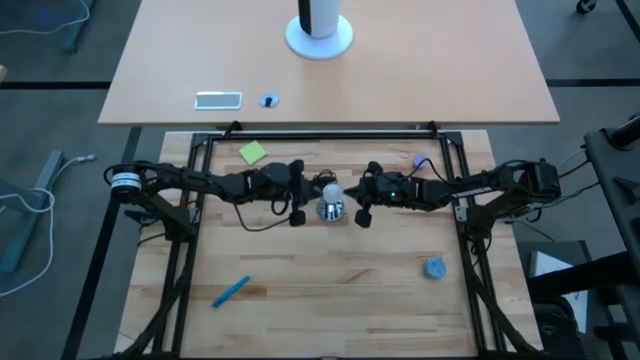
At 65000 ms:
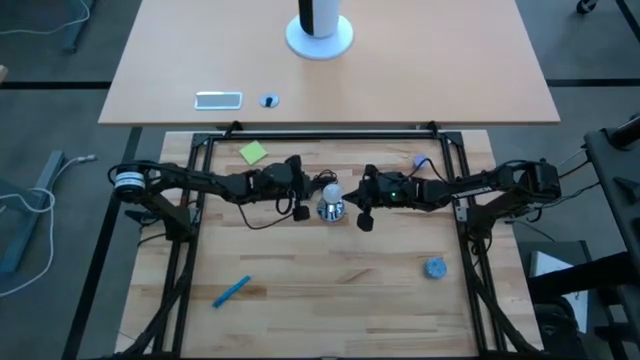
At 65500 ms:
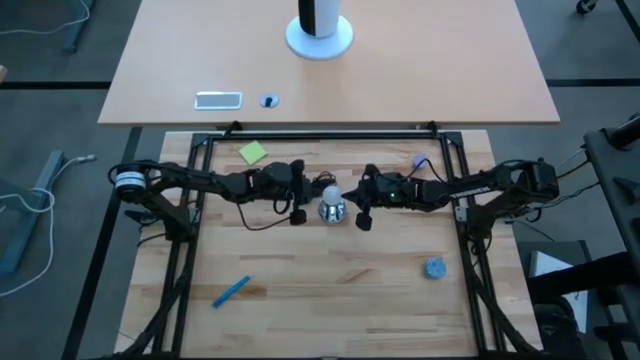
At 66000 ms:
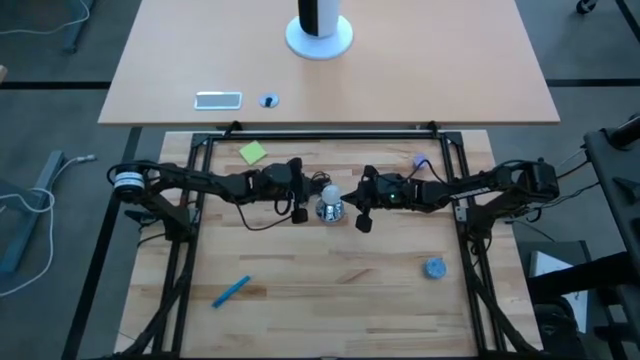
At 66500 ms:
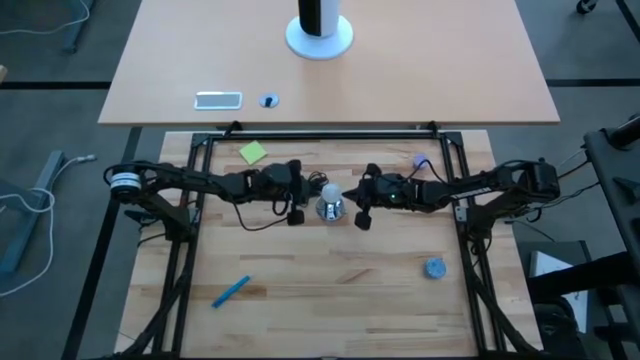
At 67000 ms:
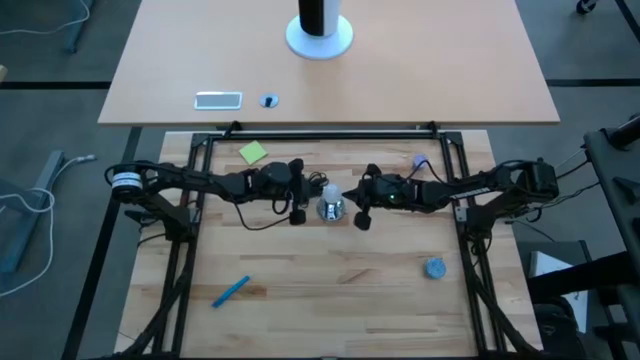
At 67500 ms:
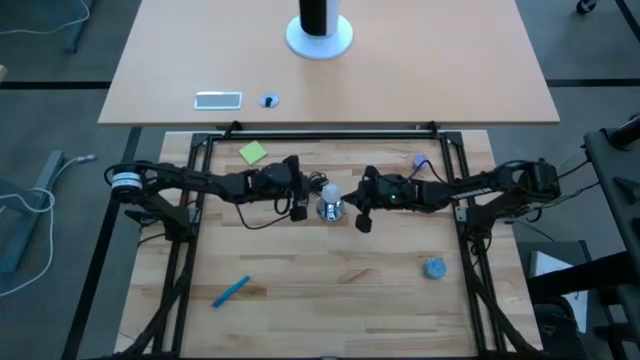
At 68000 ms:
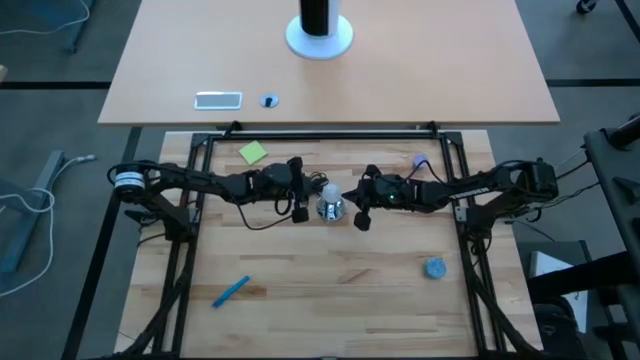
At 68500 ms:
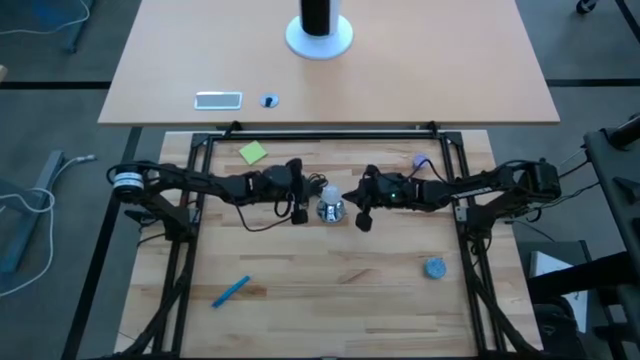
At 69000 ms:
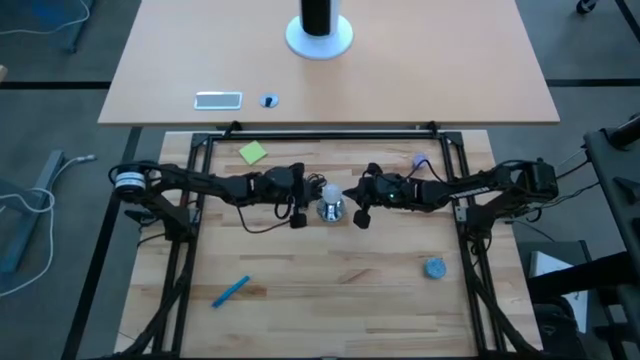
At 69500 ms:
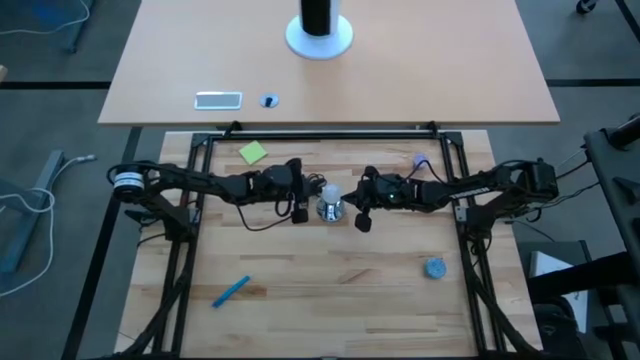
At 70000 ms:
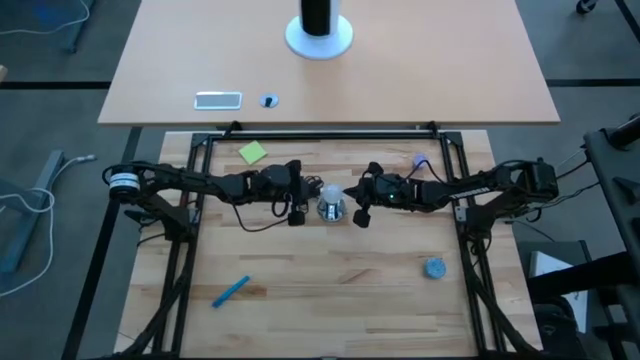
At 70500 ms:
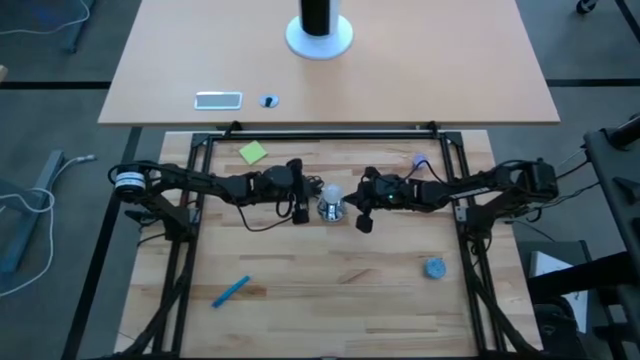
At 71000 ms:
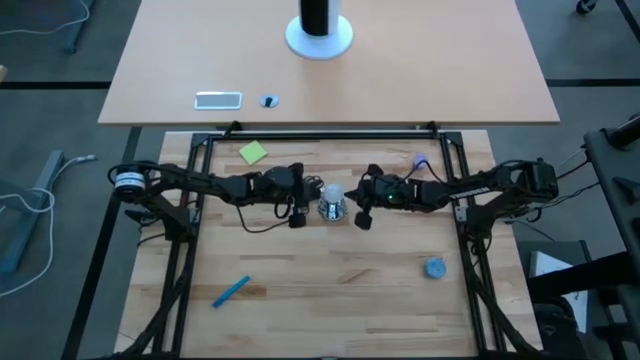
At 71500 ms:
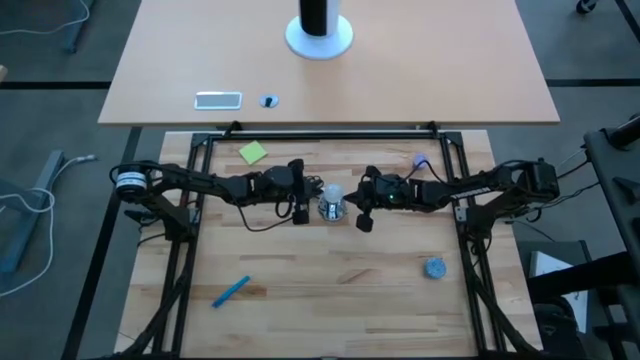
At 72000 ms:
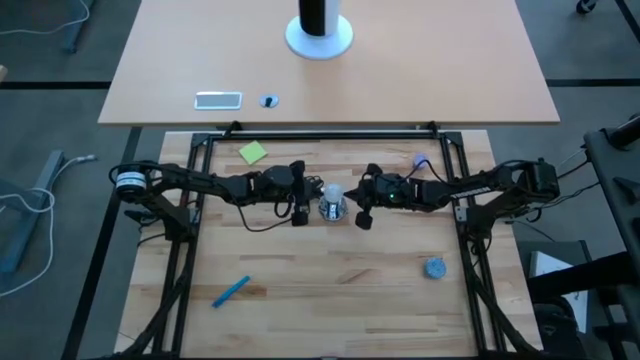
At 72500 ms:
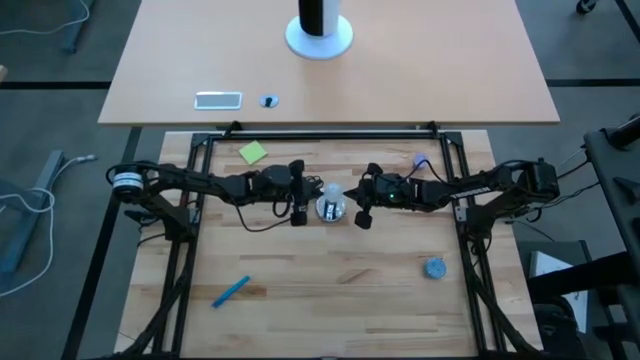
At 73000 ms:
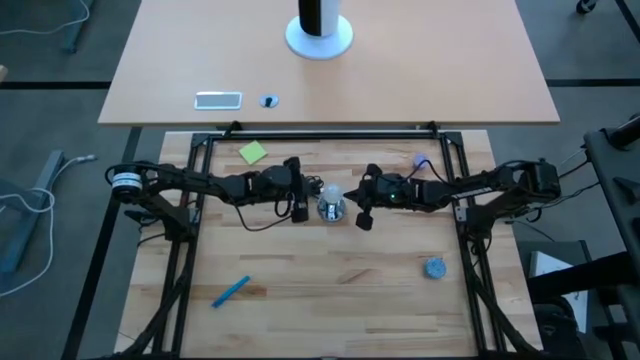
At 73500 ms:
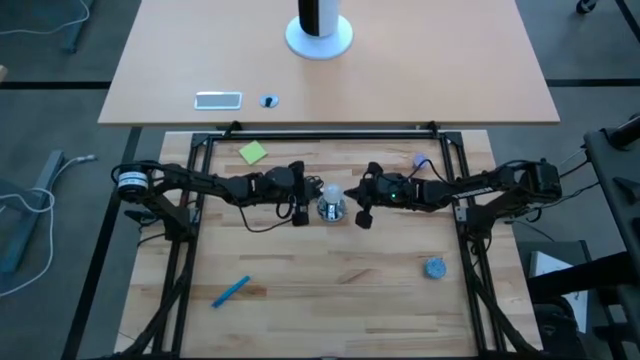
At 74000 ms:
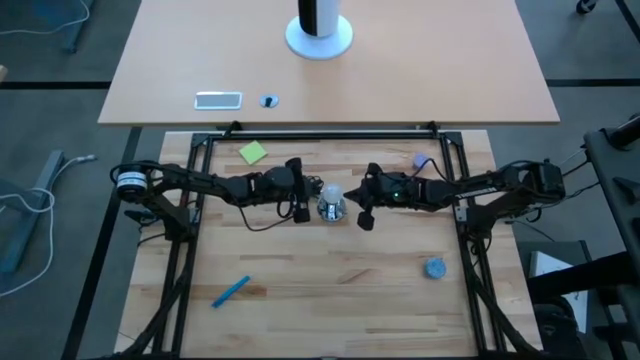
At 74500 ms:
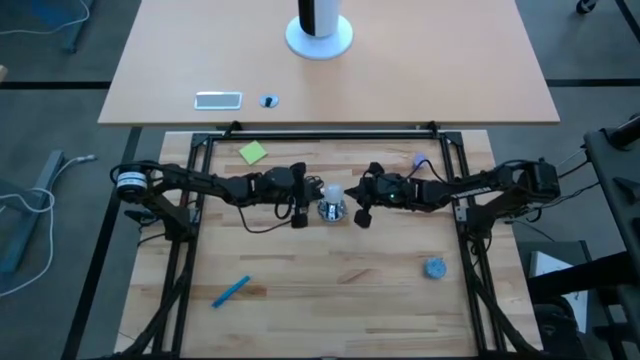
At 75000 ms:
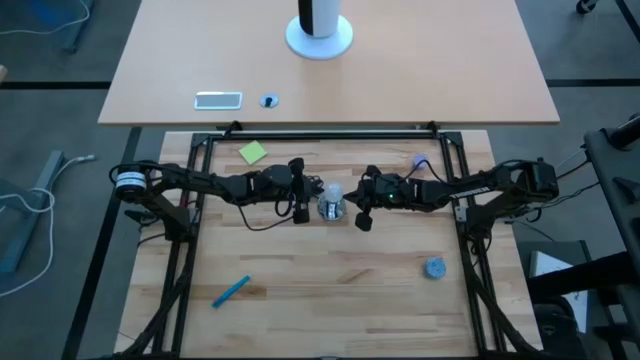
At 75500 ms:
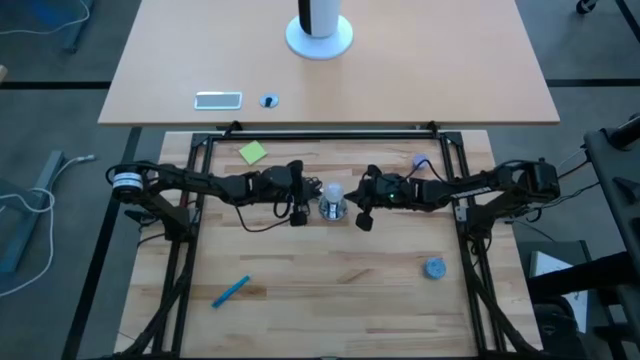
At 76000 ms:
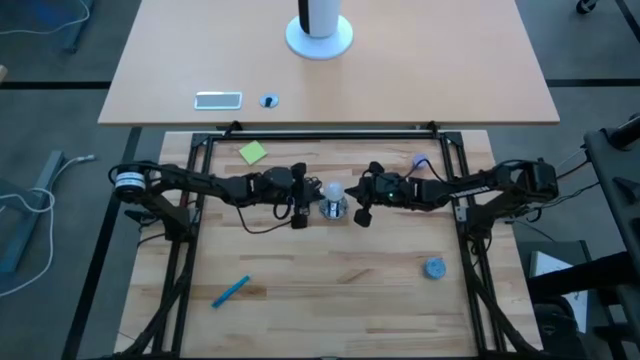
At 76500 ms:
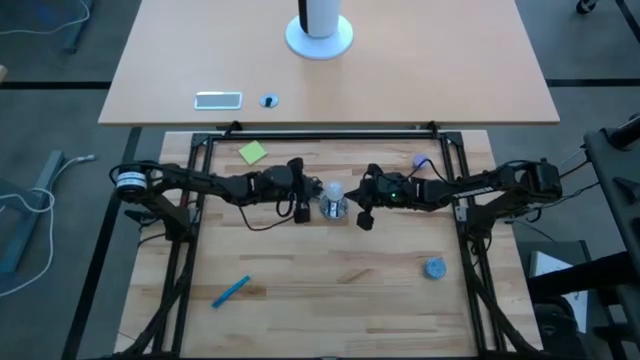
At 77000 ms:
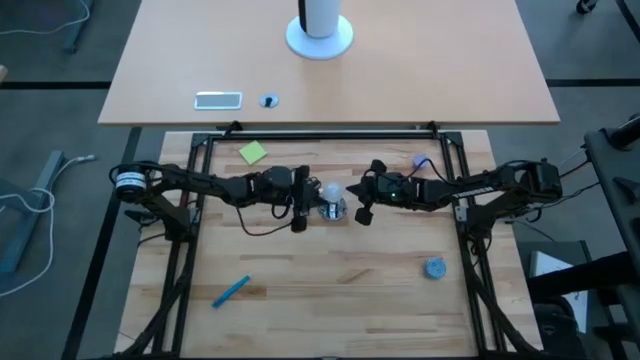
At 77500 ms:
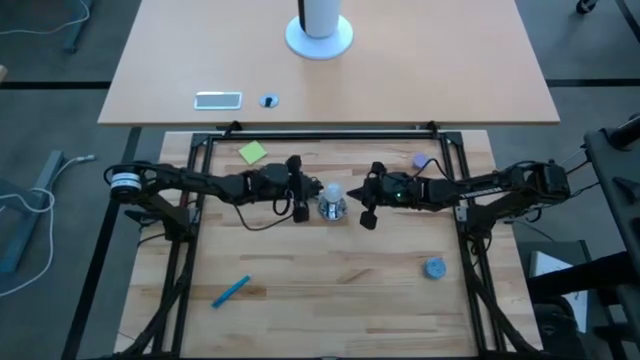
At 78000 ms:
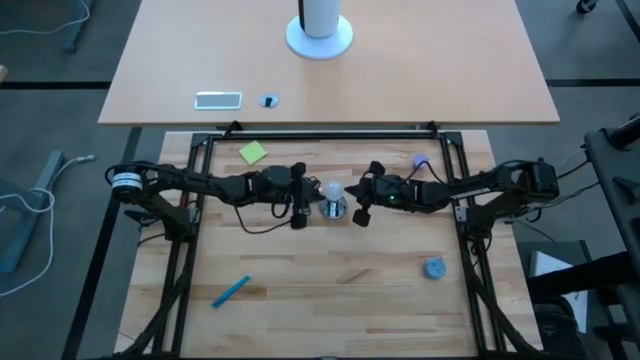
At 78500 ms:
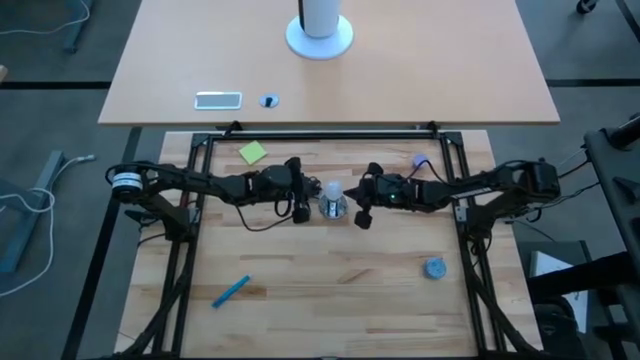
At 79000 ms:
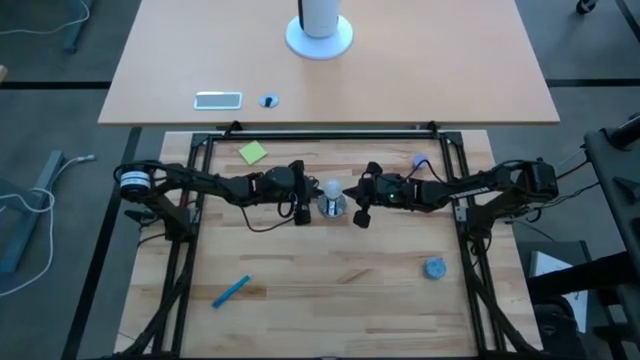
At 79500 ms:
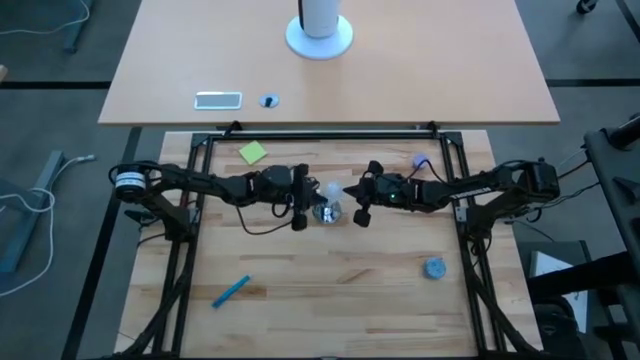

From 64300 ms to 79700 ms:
Task: Screw lightbulb
Remove the lightbulb from the lamp

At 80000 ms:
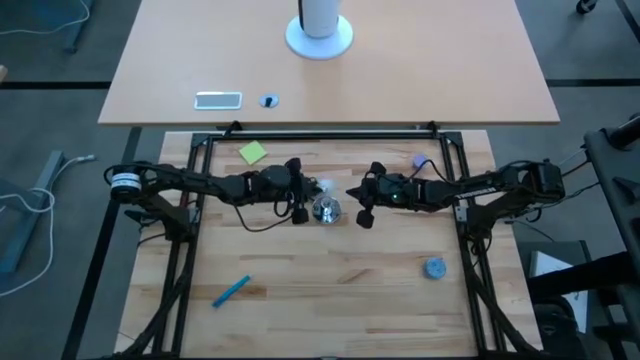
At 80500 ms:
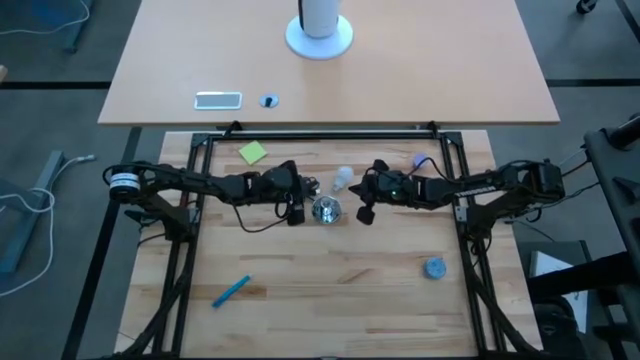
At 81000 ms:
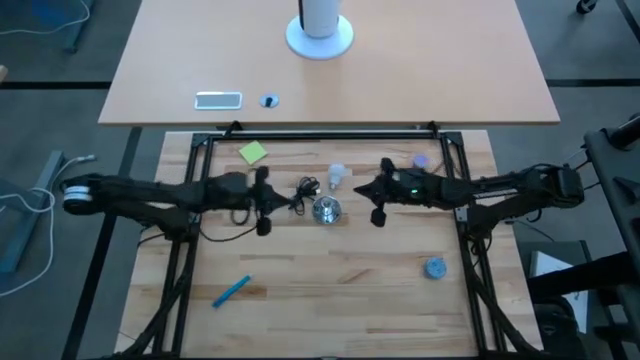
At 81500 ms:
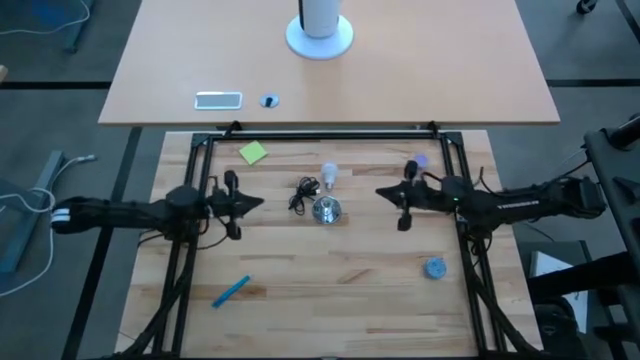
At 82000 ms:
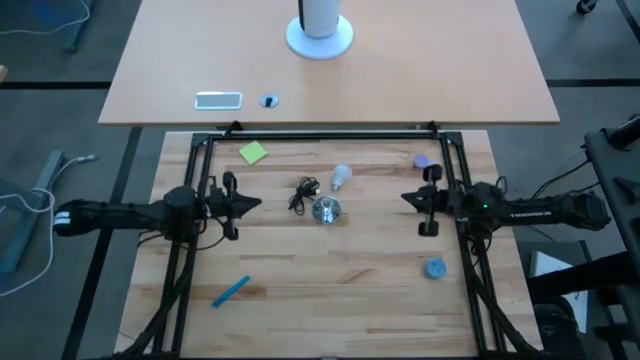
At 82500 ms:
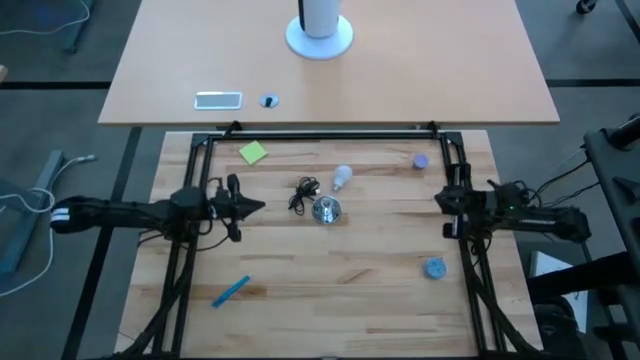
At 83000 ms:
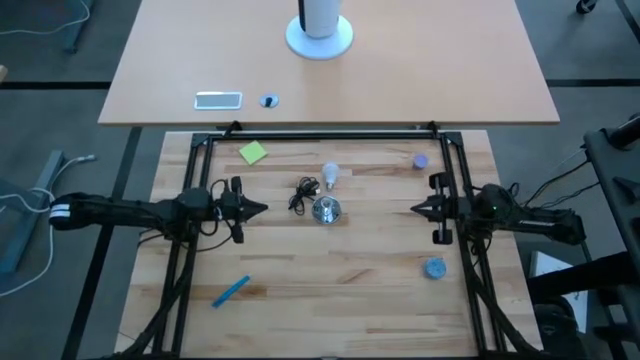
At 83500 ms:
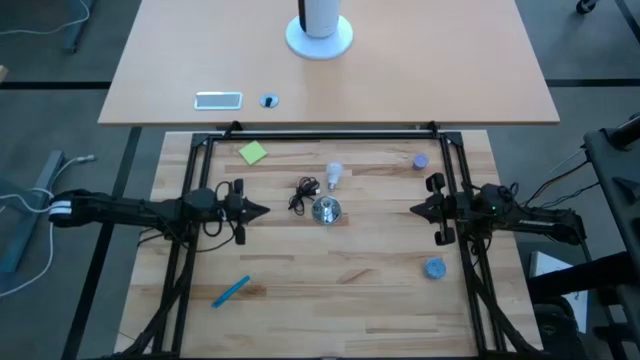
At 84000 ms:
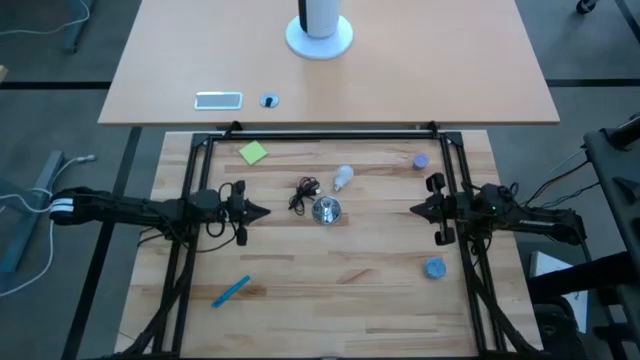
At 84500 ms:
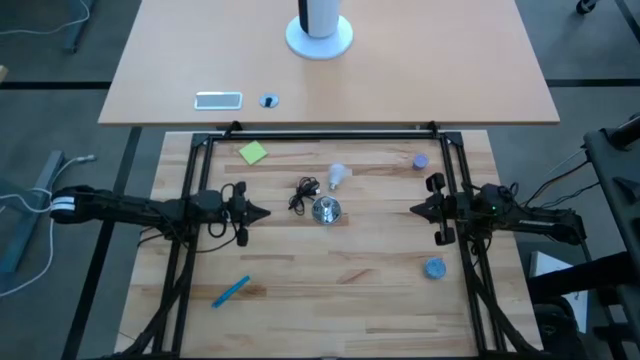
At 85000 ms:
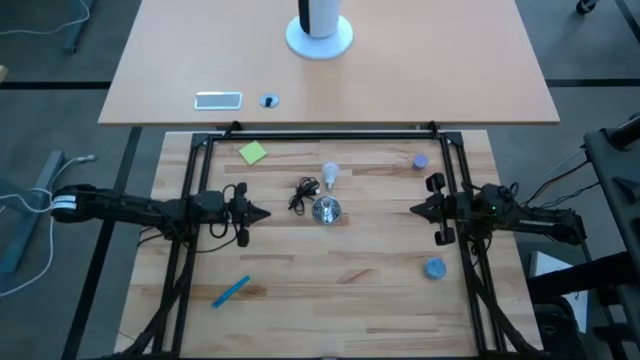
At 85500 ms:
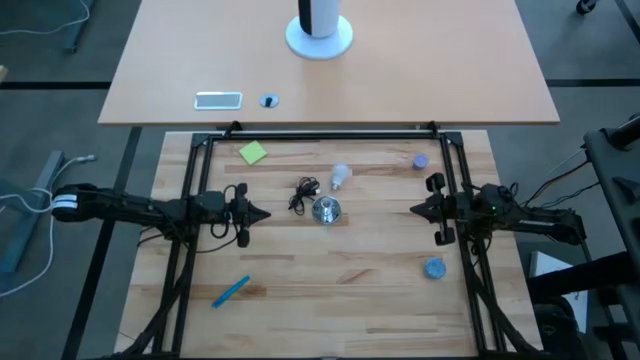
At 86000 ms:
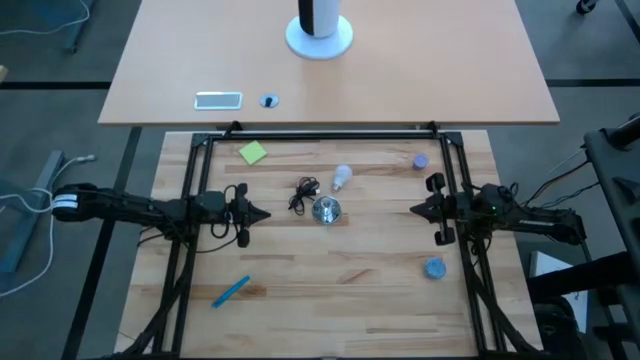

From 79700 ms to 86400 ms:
Return to Home Position
